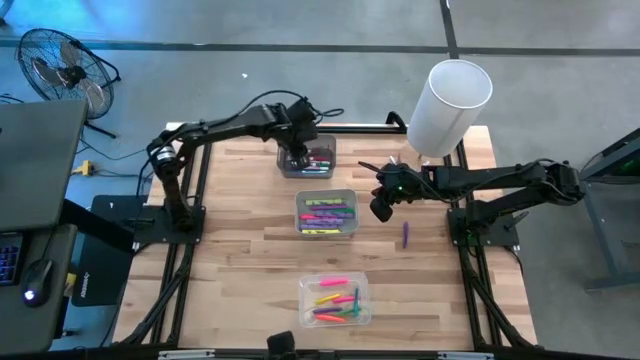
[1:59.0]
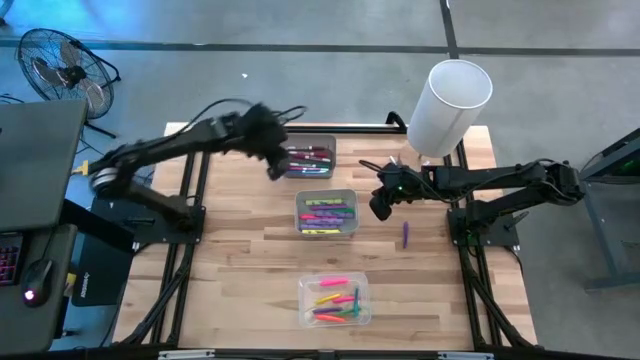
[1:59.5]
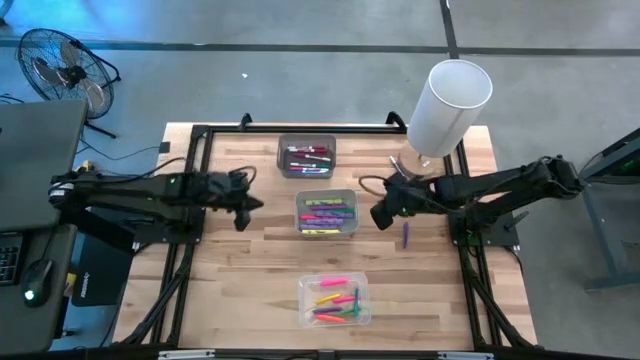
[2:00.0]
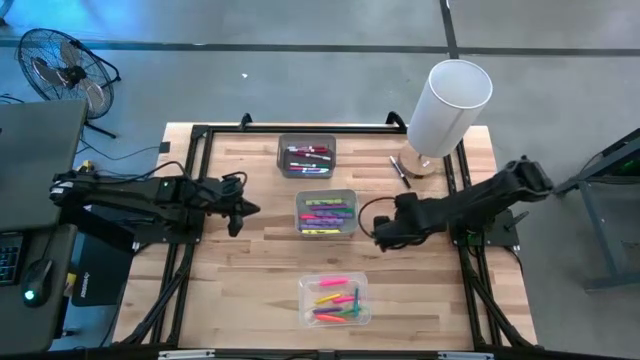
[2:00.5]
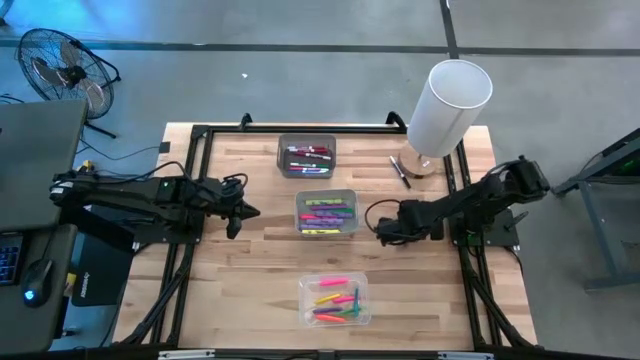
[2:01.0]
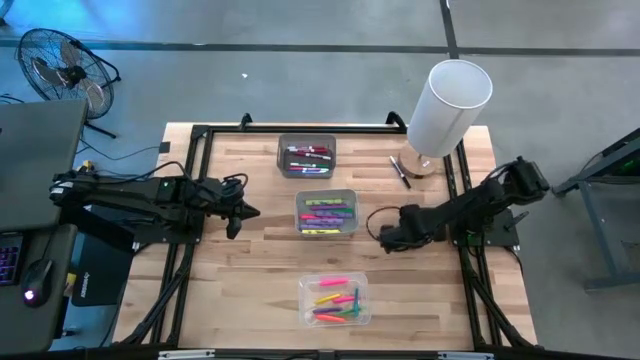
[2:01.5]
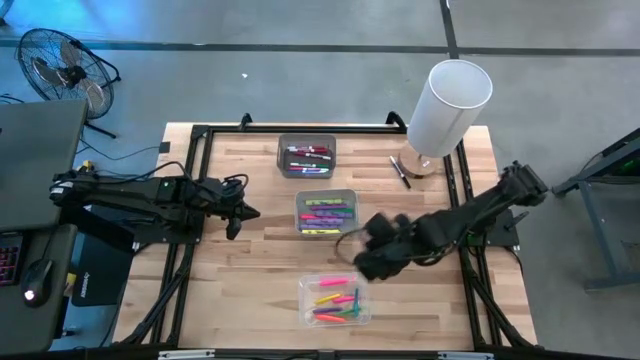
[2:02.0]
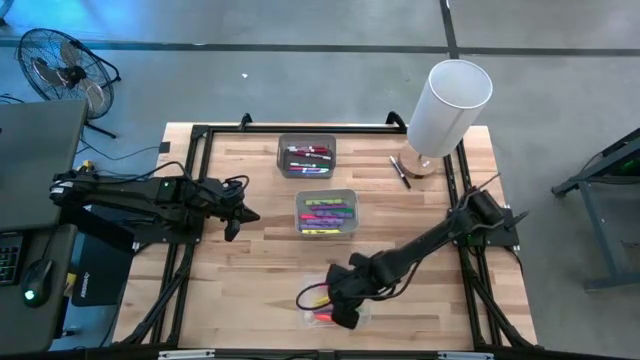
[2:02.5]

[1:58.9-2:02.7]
Task: Pick & Place Markers
Put the violet pen into the transparent bin

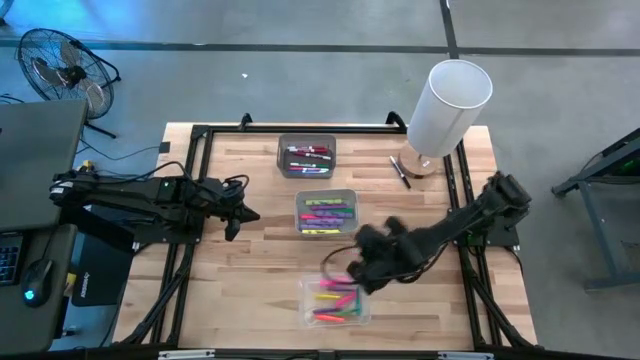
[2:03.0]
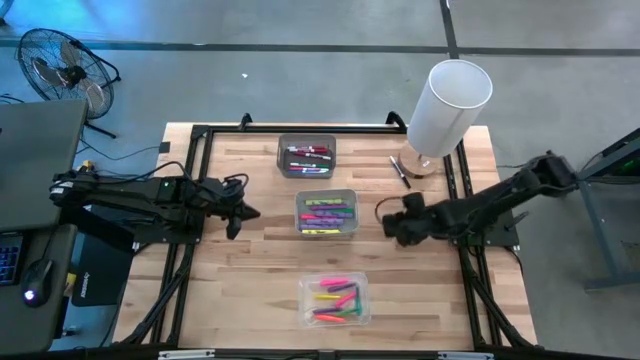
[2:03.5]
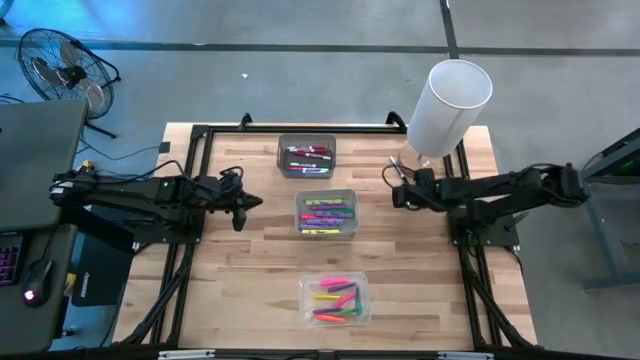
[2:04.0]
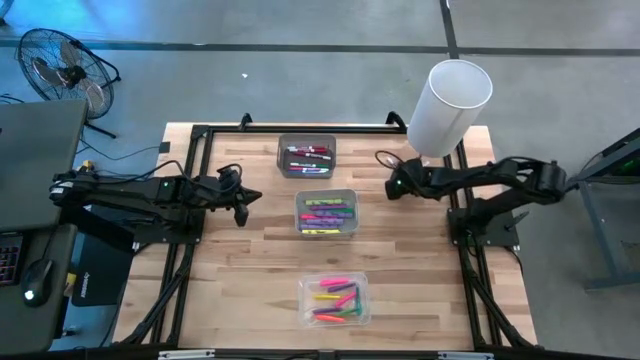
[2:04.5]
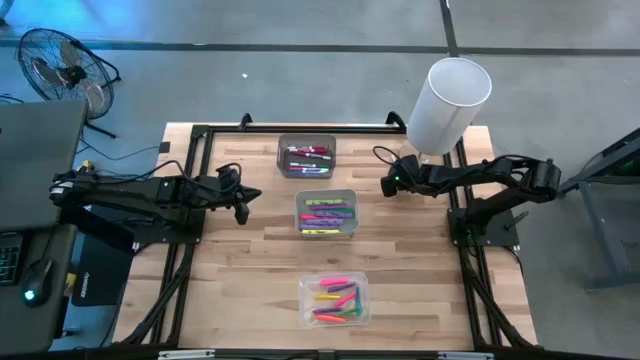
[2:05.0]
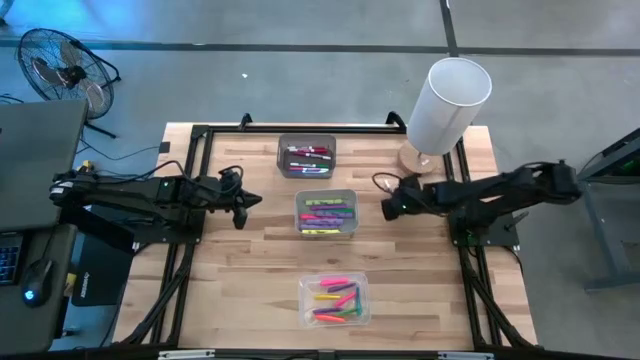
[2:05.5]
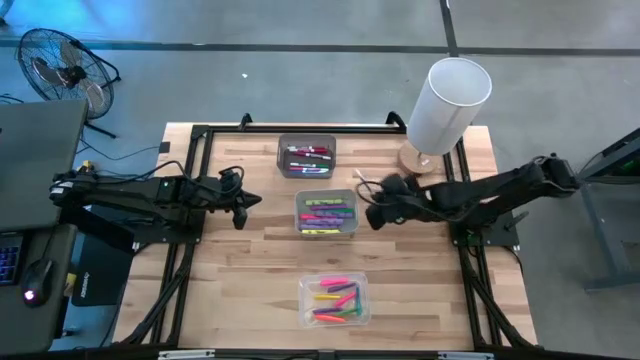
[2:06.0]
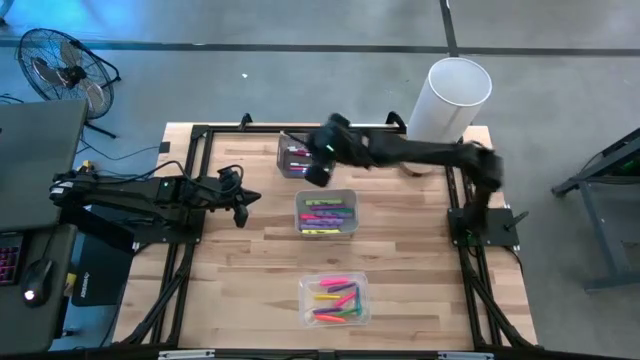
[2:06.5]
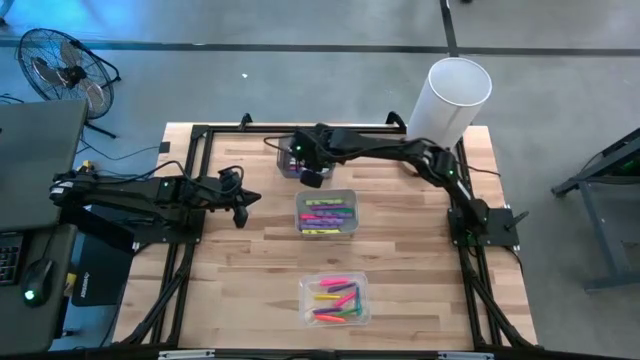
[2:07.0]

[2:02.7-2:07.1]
Put the black marker pen into the black bin

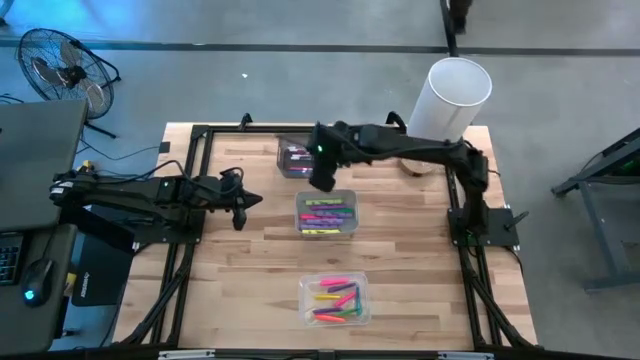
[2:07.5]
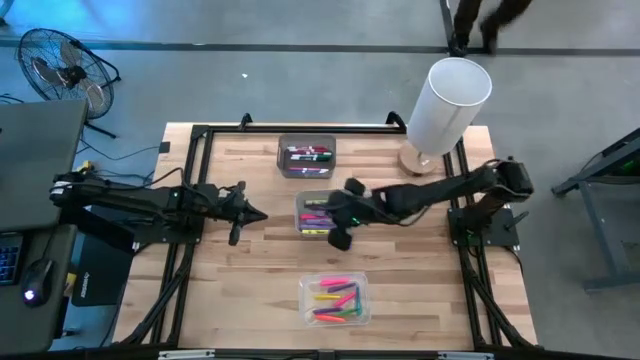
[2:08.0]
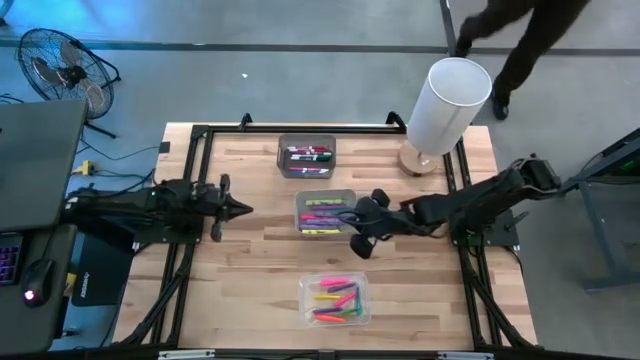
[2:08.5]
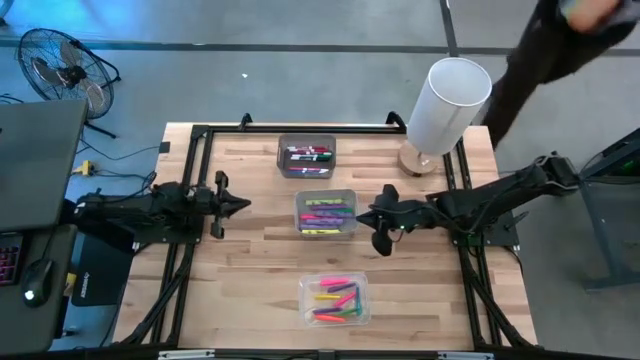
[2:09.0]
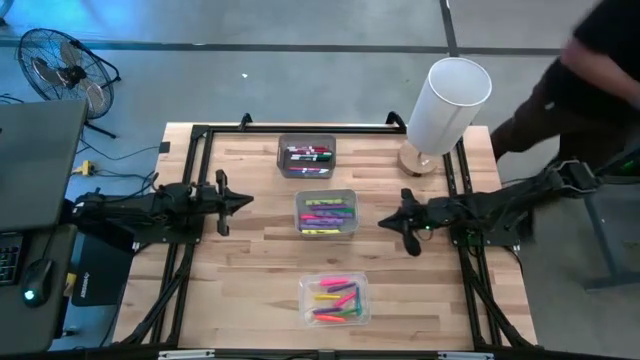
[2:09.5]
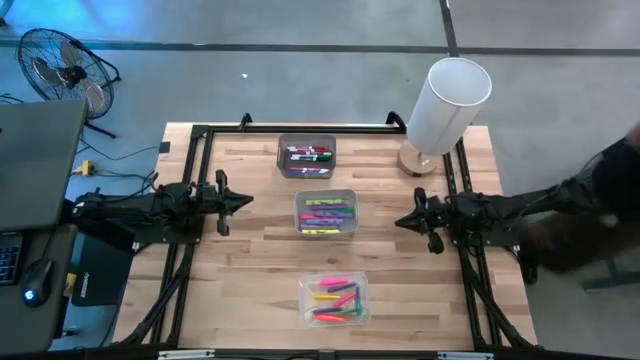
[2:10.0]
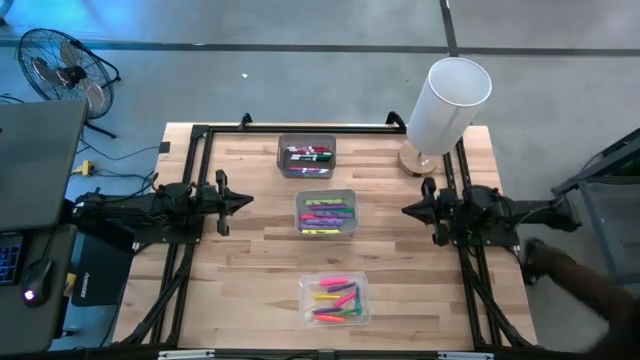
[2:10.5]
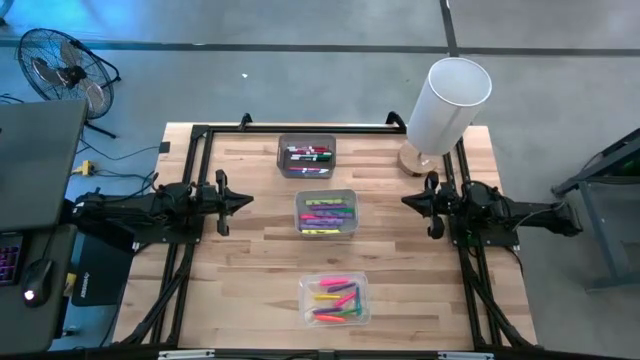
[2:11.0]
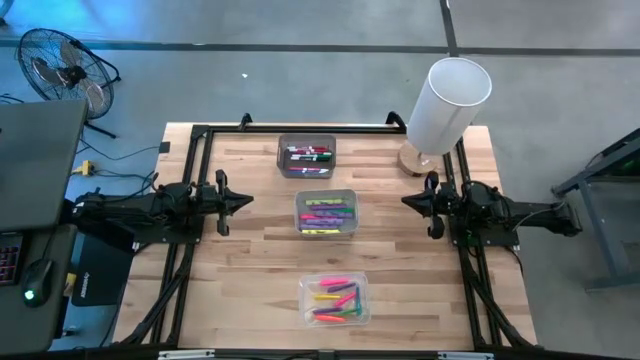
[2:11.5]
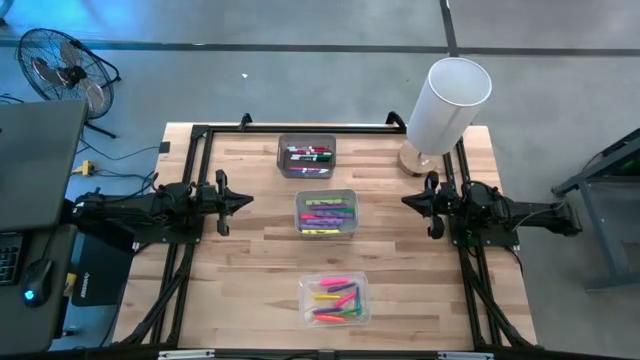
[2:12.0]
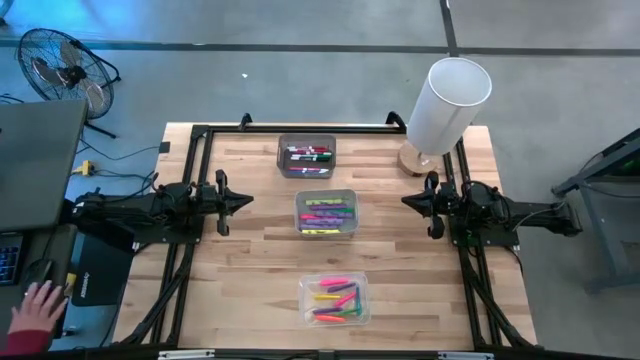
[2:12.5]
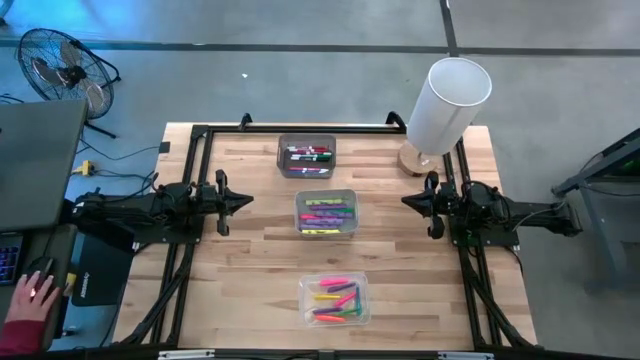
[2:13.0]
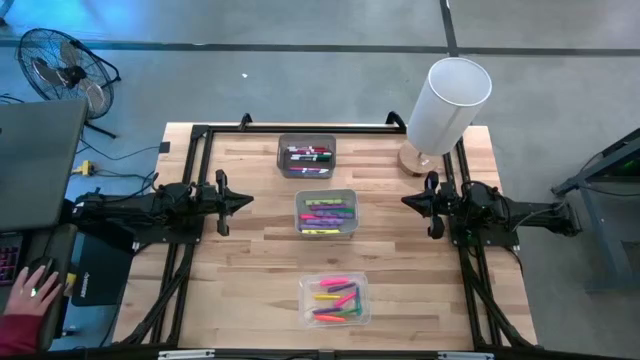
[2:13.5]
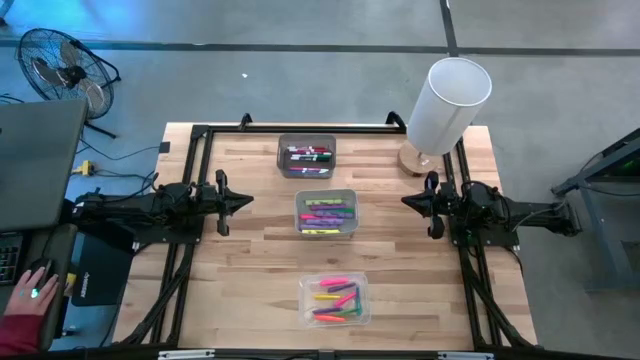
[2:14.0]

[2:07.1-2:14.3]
Return to Home Position

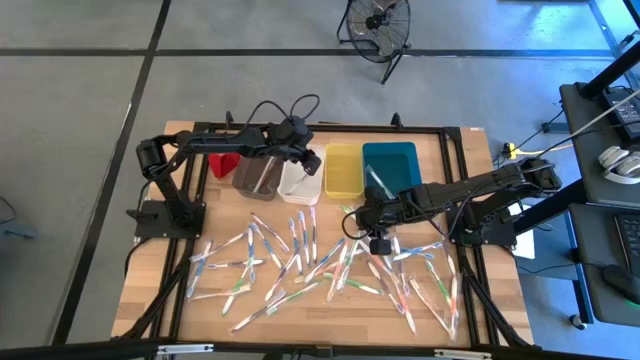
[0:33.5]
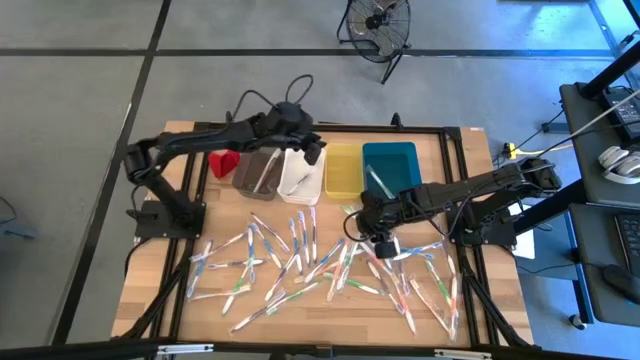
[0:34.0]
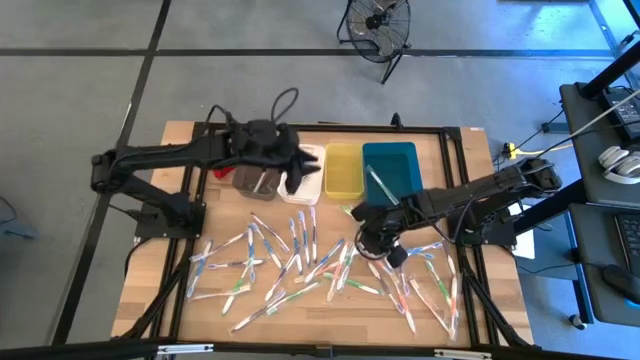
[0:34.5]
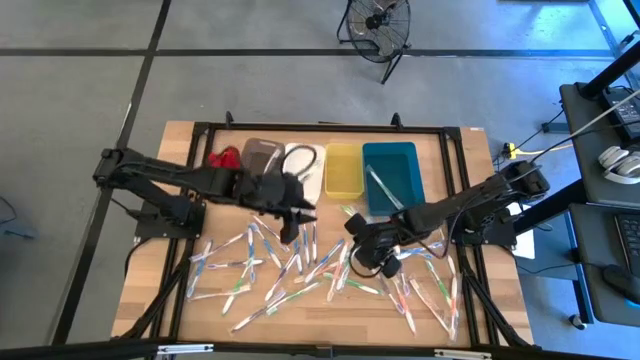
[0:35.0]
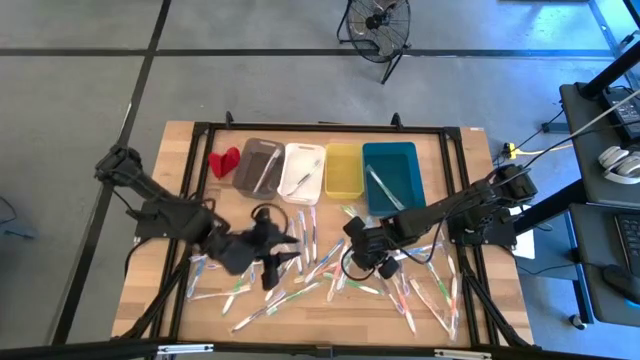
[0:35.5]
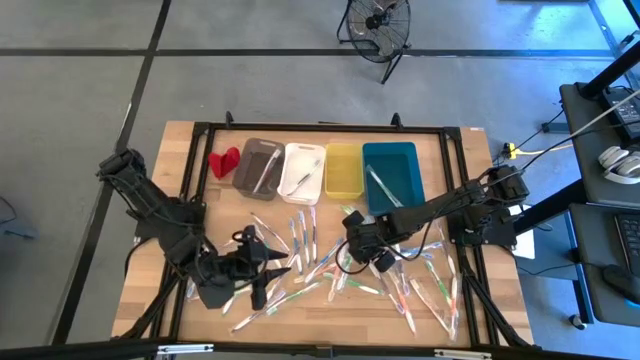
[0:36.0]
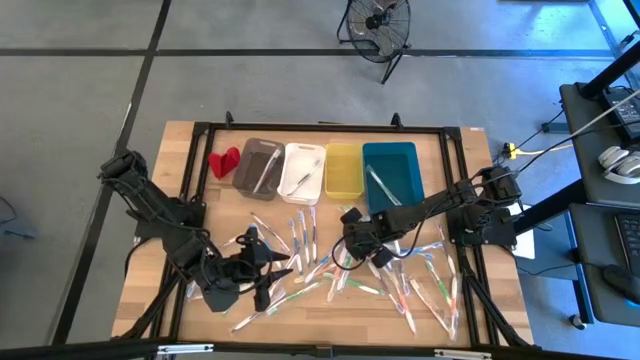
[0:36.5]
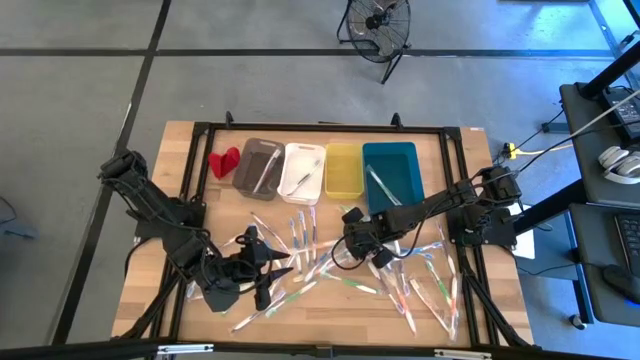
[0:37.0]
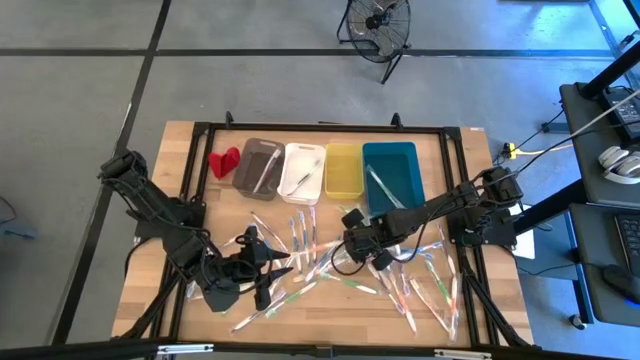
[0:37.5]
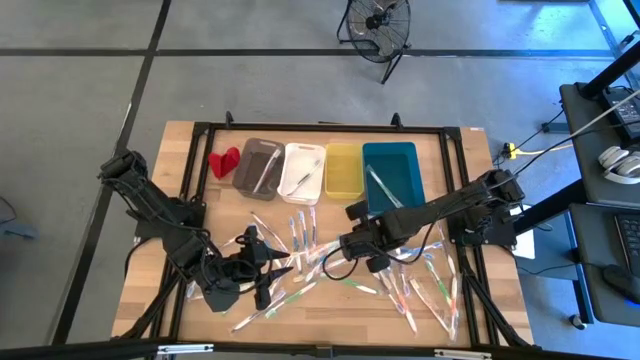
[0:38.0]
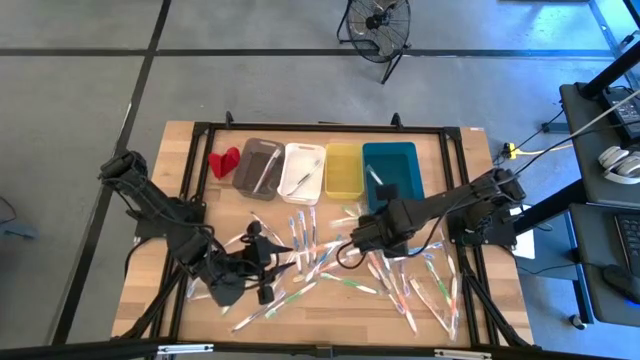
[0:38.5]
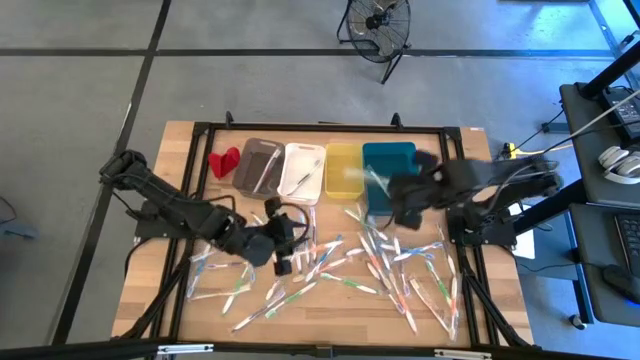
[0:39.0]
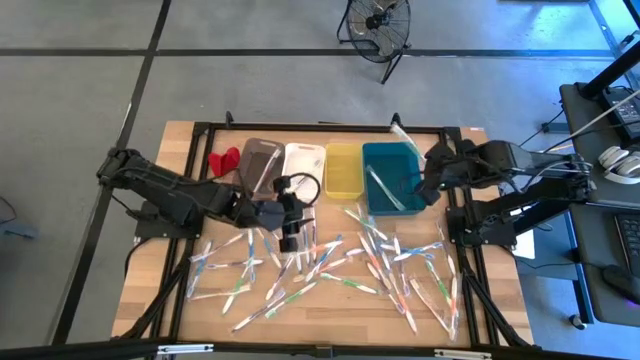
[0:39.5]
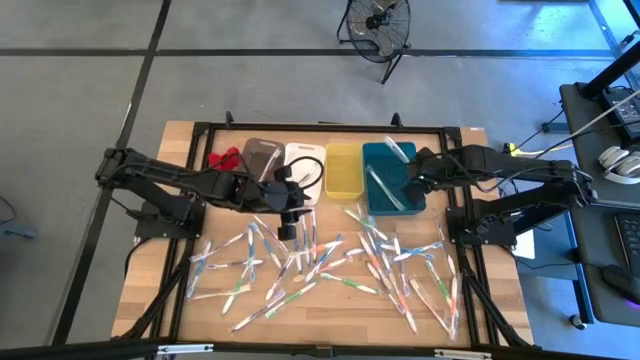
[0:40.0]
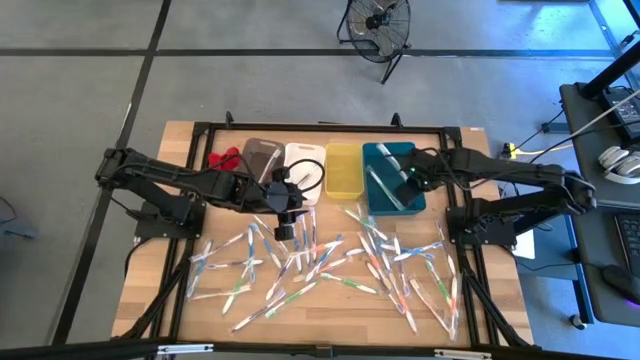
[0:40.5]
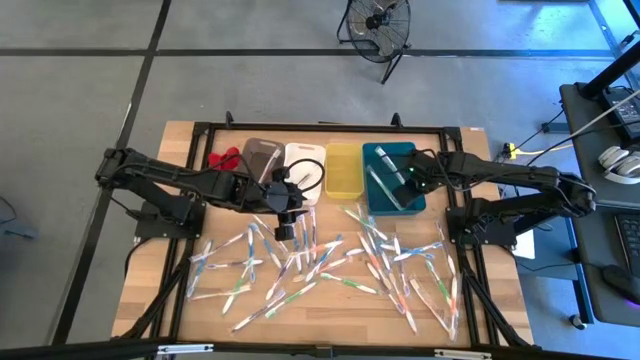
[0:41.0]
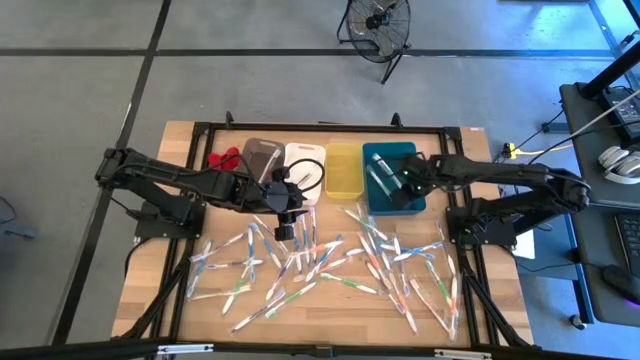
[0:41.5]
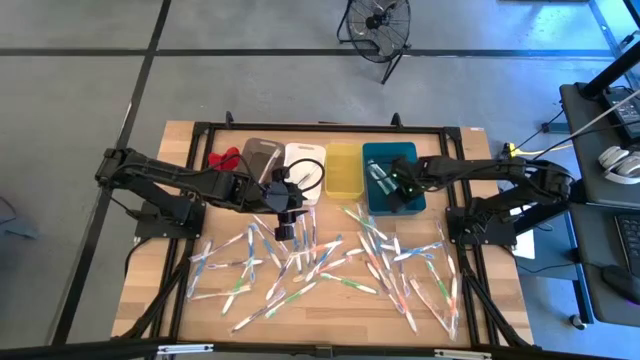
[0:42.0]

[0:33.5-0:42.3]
Task: Pick & Place Toothbrushes
Put the green toothbrush into the blue bin
